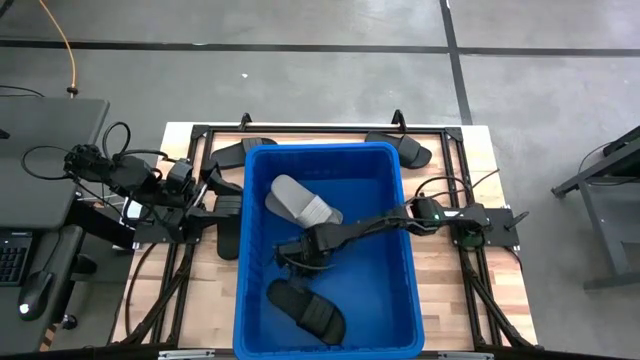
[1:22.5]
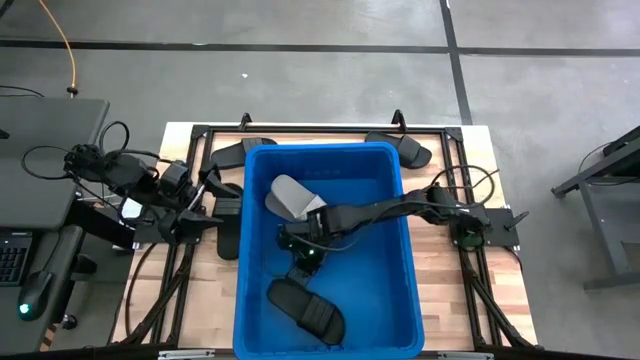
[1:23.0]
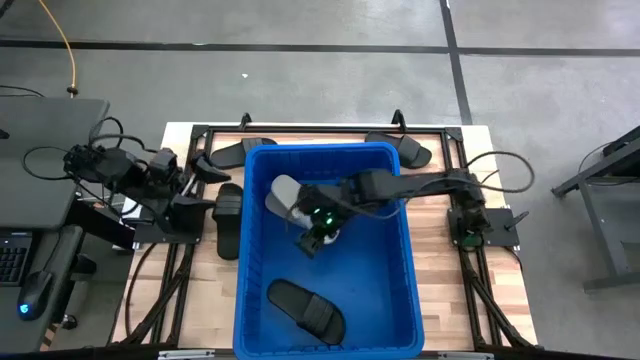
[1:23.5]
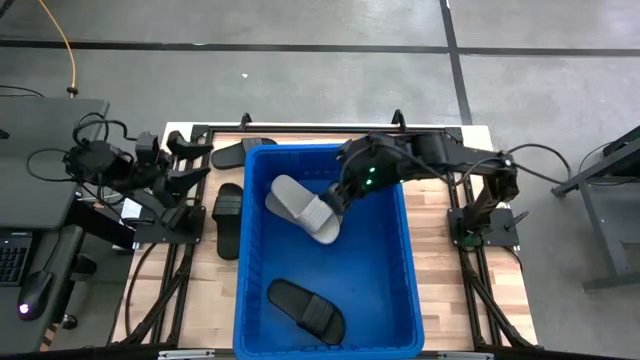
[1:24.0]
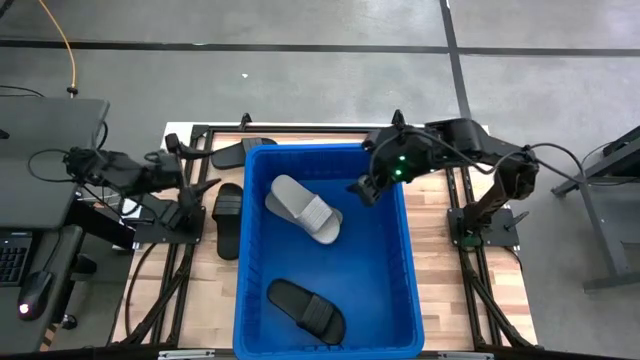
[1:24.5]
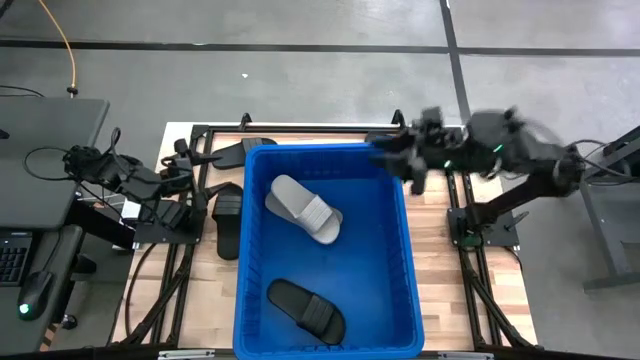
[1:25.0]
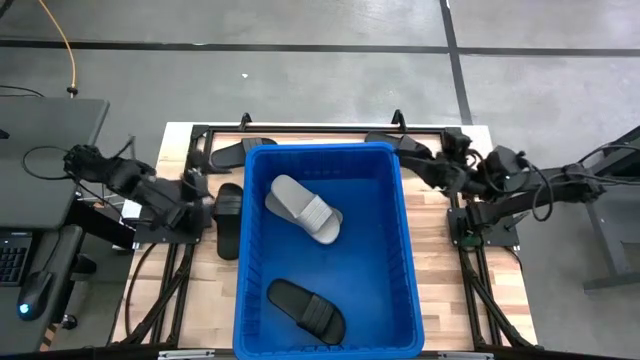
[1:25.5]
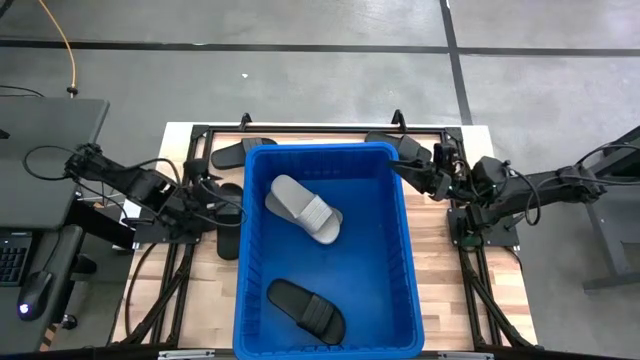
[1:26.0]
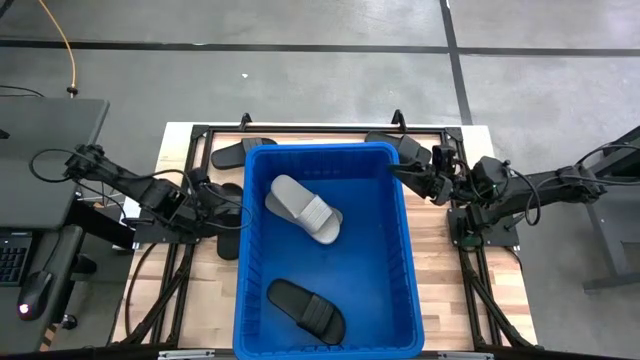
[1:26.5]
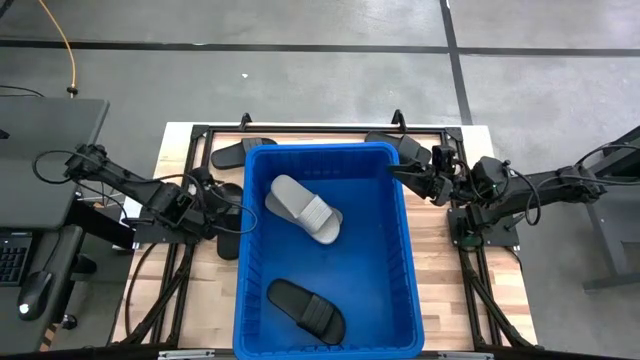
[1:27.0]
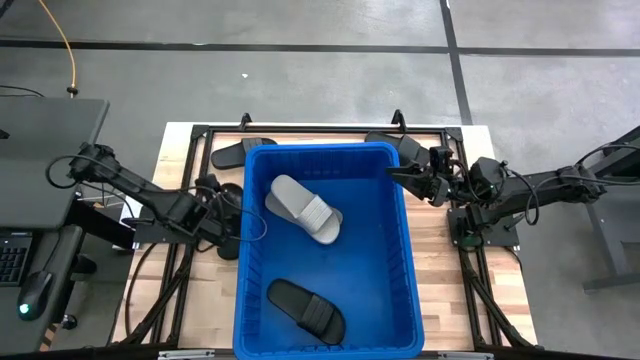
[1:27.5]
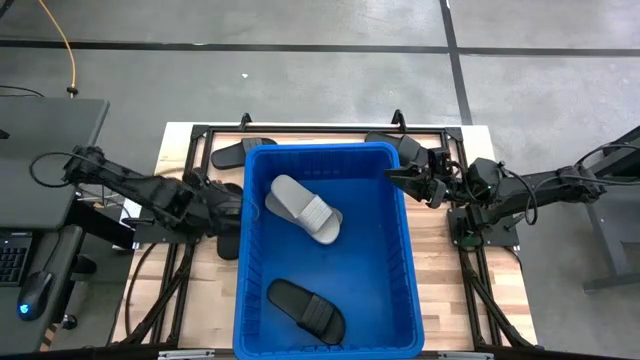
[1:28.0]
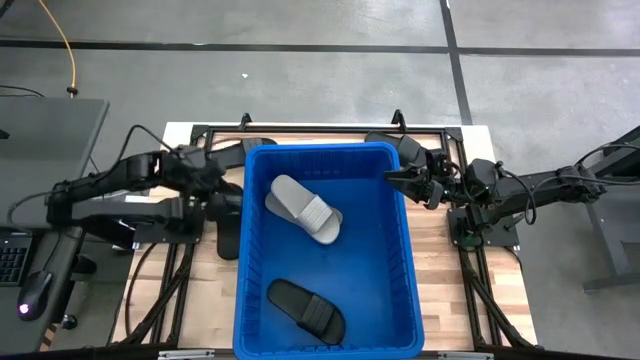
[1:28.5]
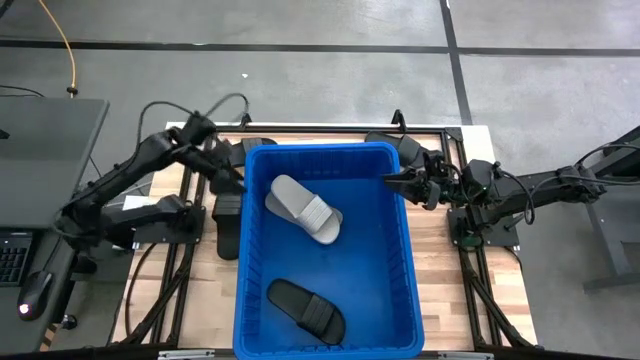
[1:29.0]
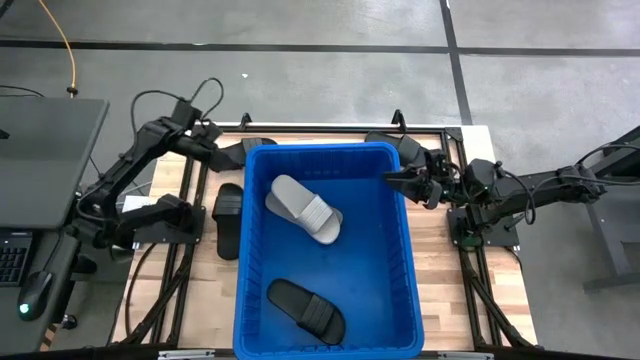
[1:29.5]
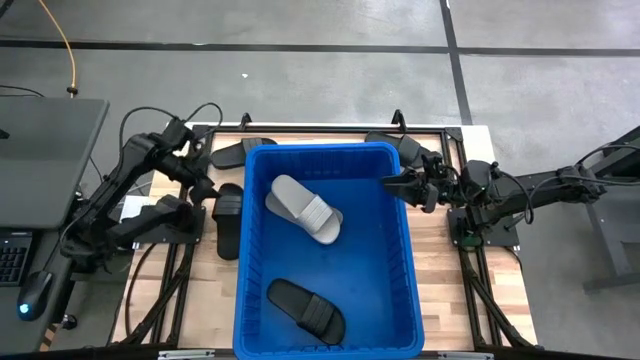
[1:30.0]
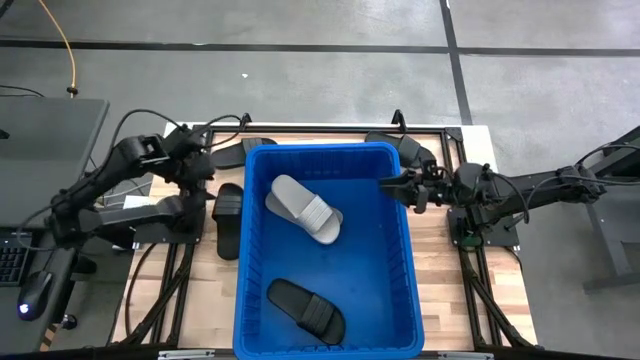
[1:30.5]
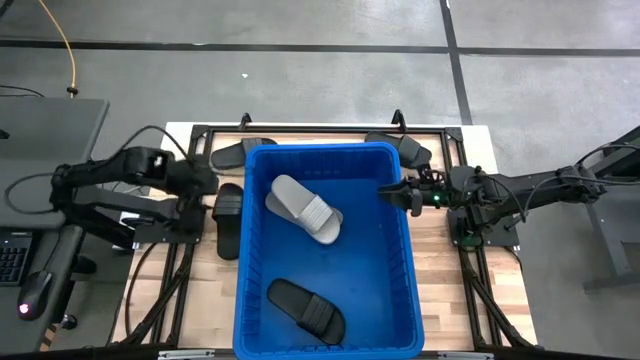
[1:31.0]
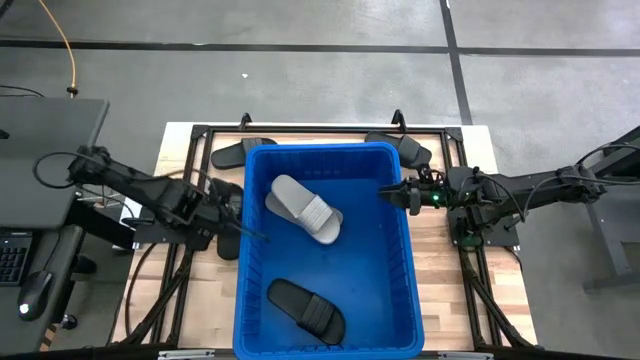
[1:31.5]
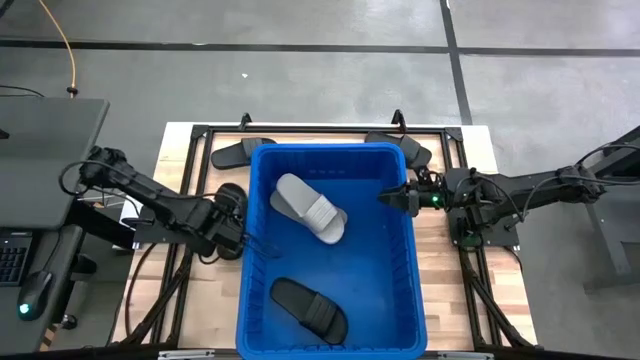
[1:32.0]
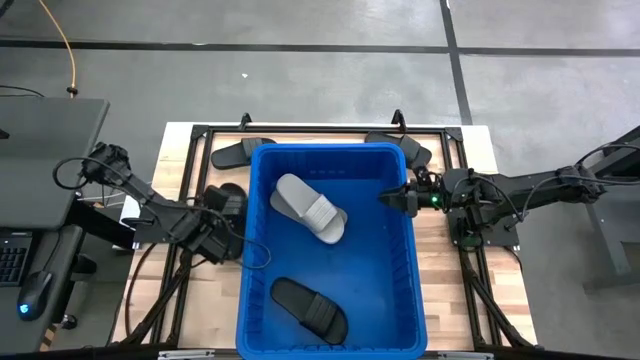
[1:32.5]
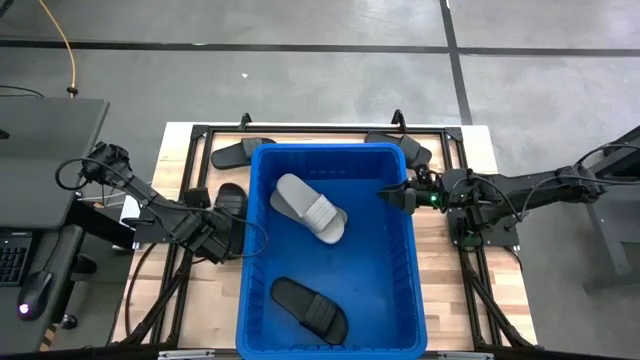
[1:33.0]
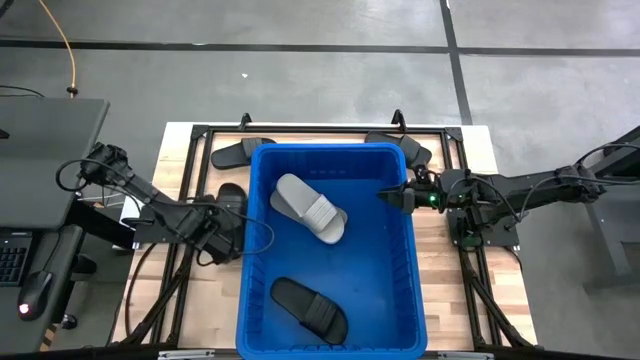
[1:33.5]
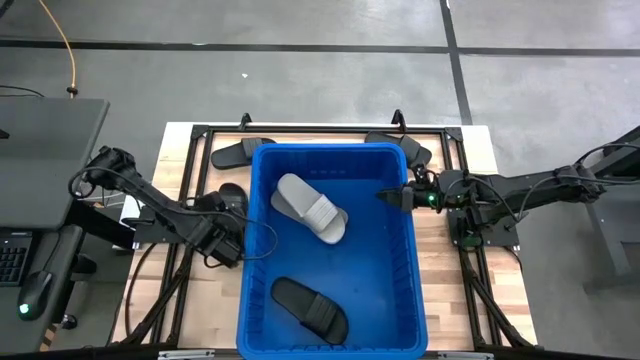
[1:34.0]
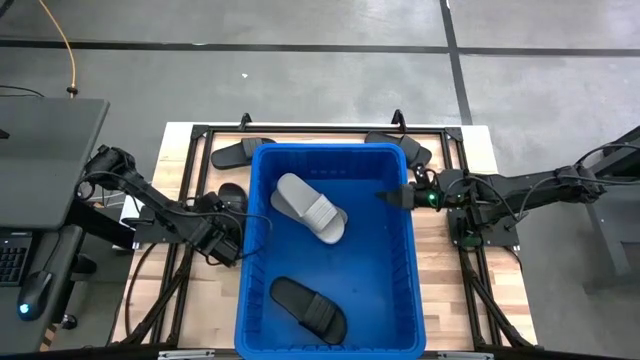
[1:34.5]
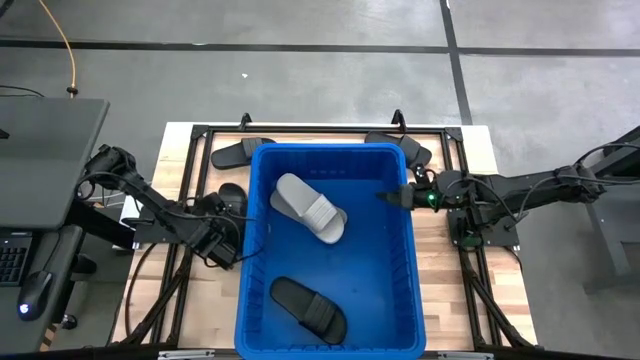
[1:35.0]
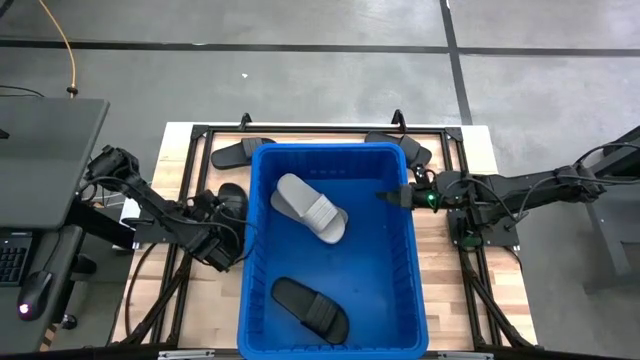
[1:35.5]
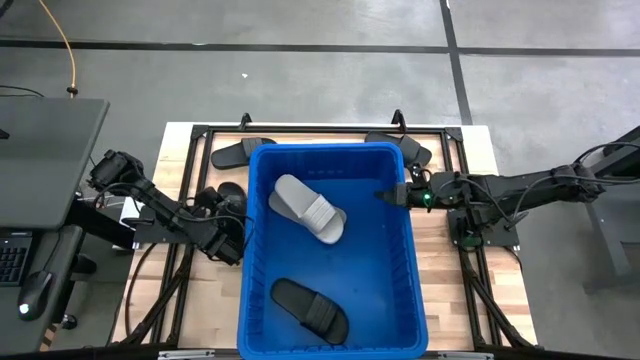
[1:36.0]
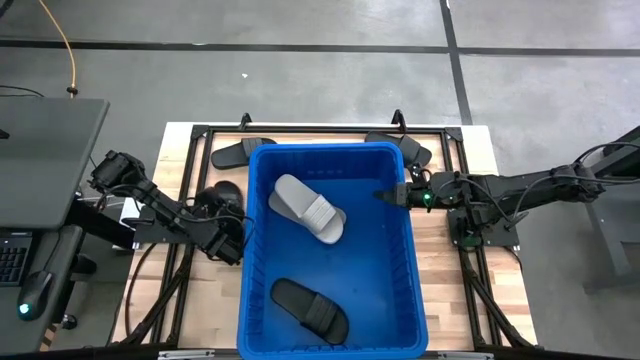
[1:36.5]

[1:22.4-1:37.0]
Task: Pick and place slides into bin
Put the bottom black slipper into the blue bin

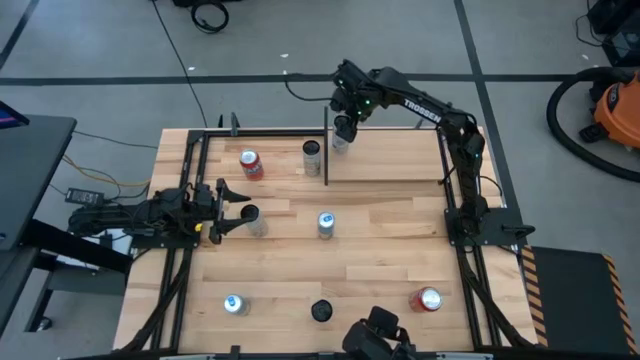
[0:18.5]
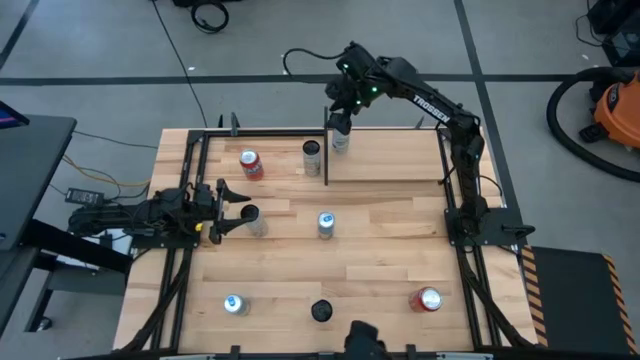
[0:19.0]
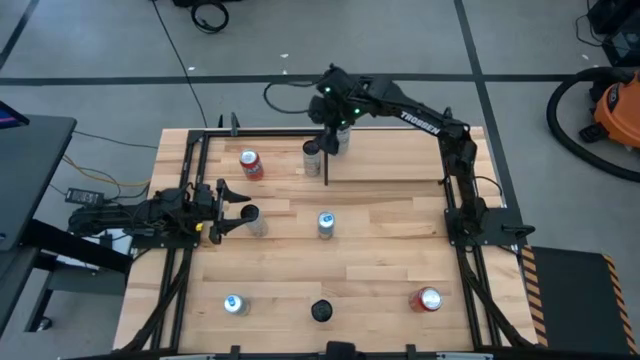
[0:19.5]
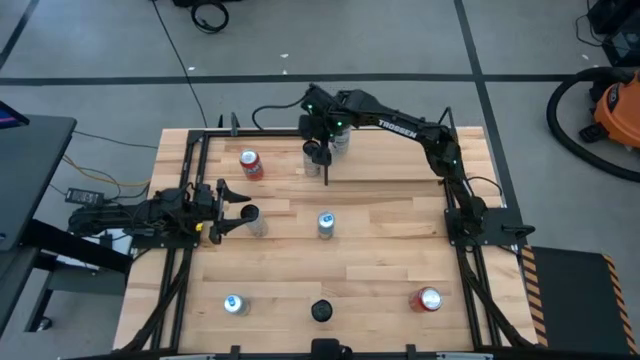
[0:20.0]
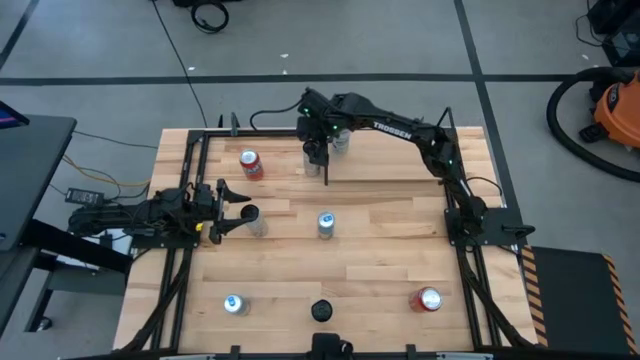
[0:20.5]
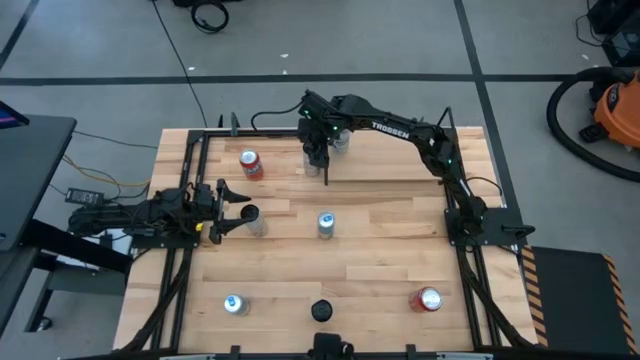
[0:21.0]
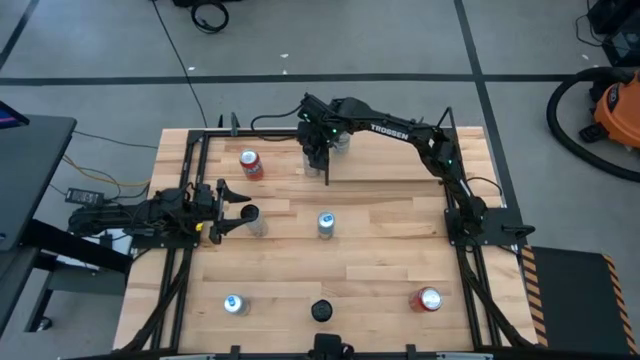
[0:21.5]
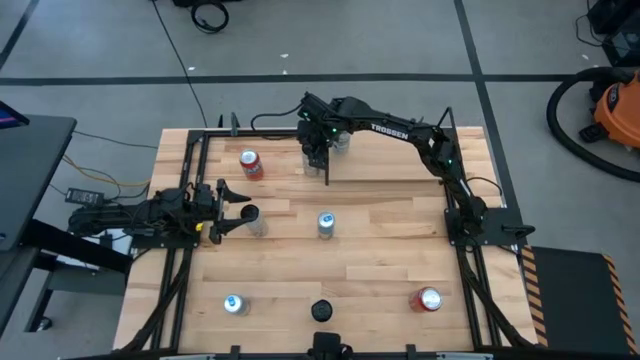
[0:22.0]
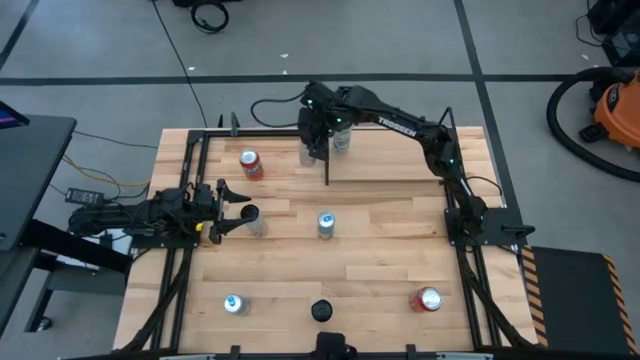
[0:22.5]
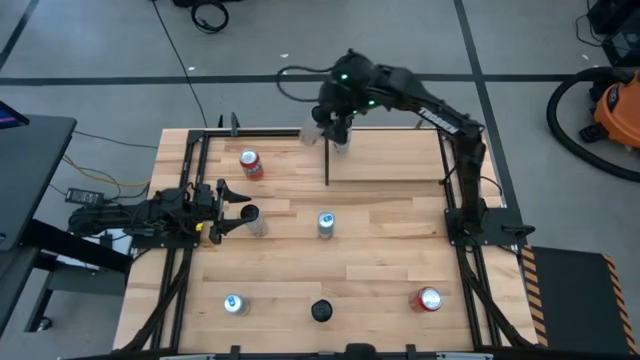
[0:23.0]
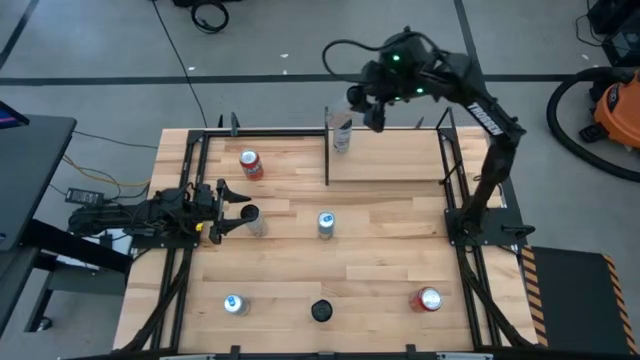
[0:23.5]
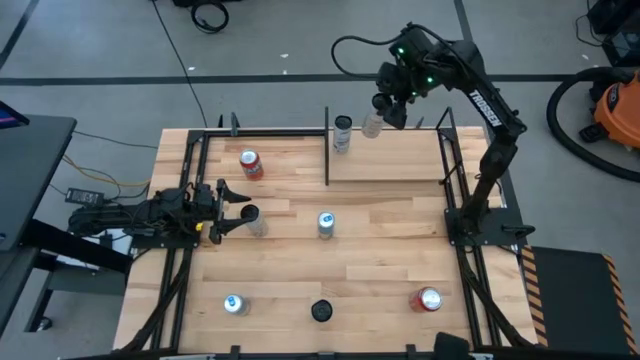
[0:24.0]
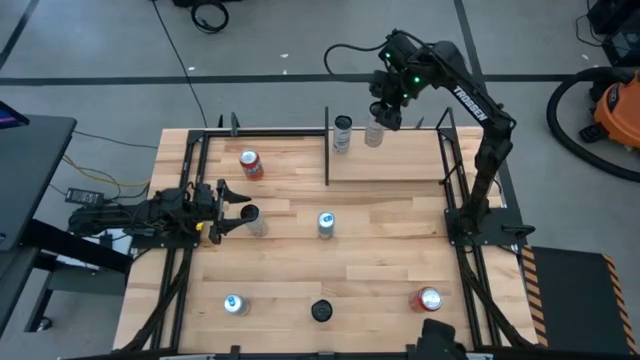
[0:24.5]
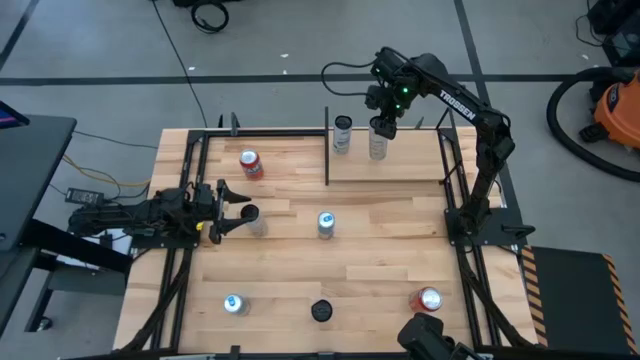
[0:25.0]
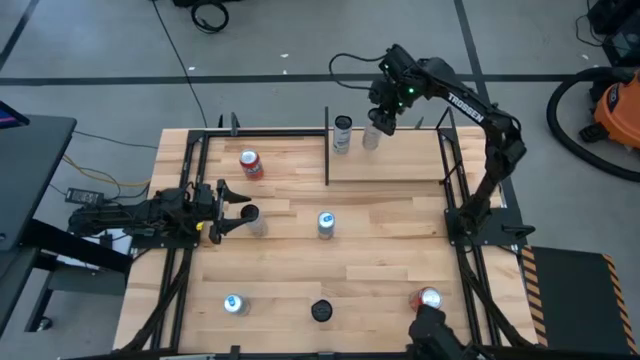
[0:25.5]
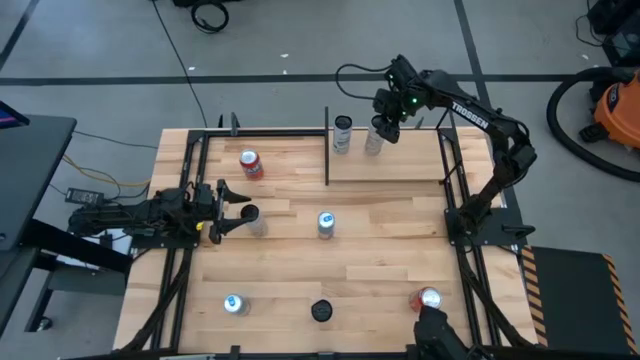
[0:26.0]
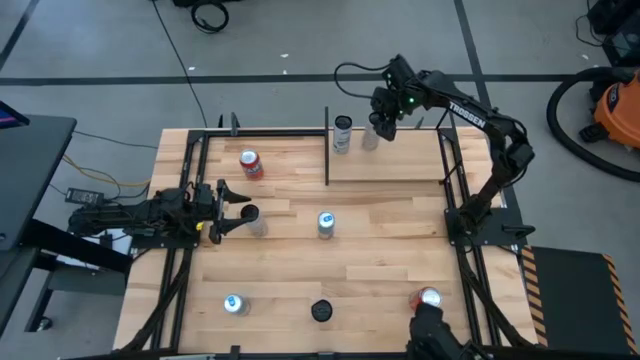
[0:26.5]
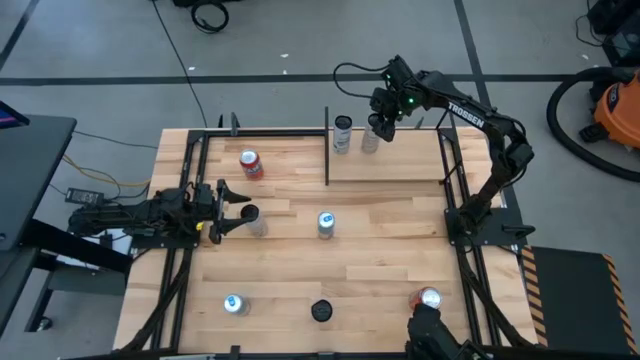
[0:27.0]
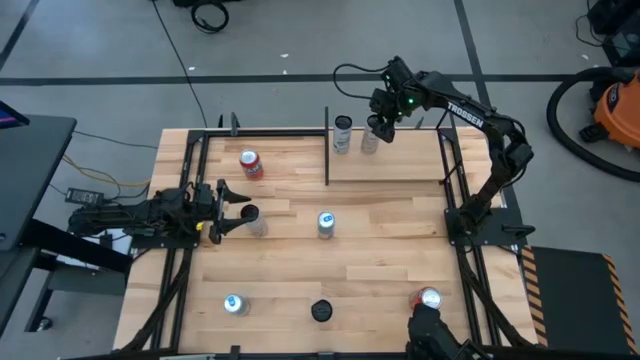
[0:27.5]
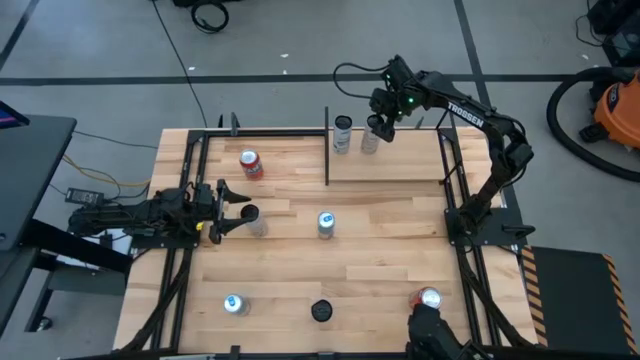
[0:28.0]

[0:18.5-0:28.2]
Task: Place canned beverage on shelf
Put the white yellow top soda can on the shelf
